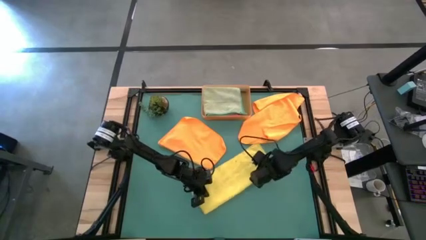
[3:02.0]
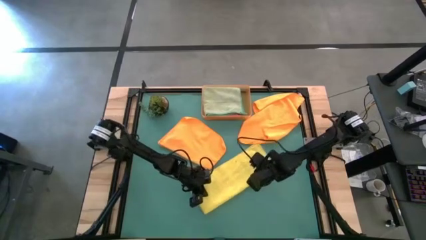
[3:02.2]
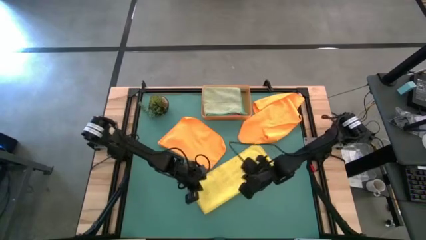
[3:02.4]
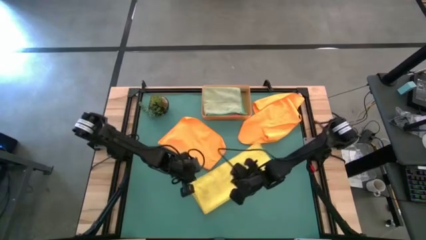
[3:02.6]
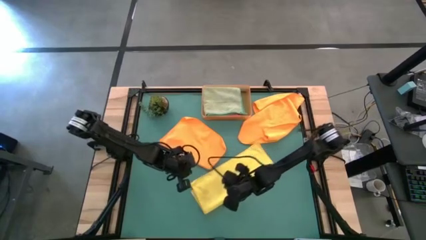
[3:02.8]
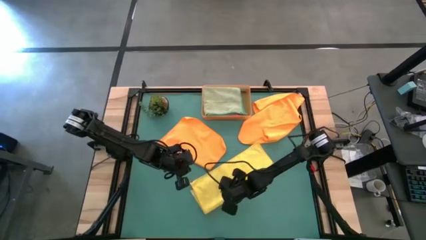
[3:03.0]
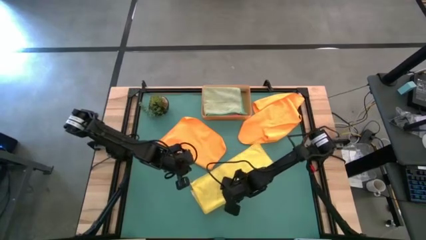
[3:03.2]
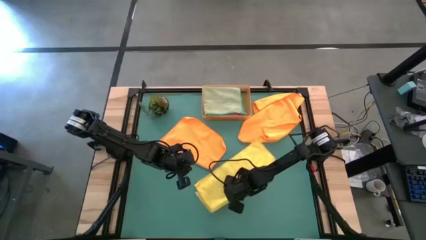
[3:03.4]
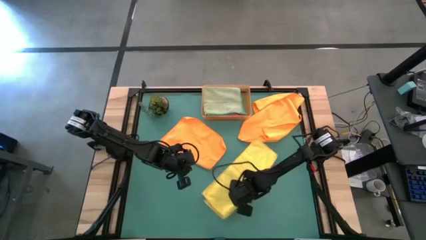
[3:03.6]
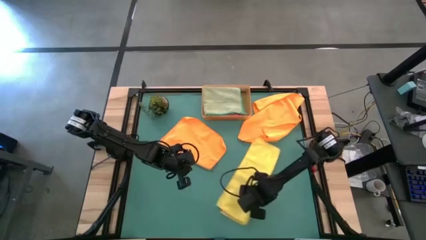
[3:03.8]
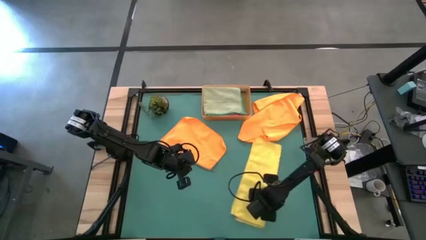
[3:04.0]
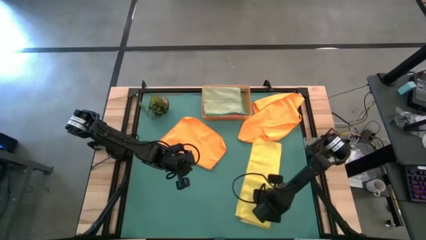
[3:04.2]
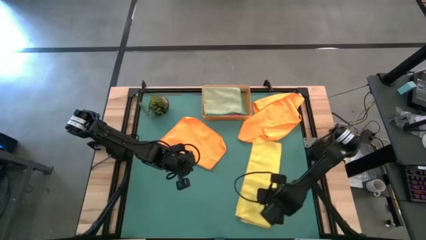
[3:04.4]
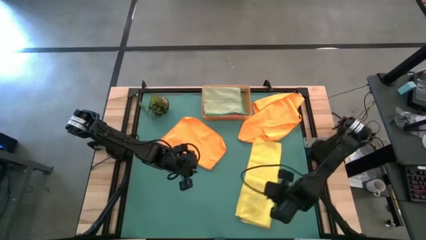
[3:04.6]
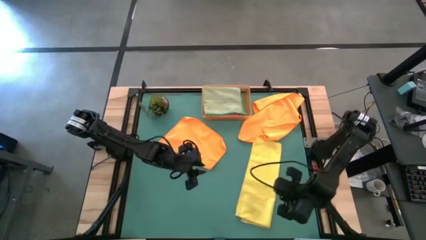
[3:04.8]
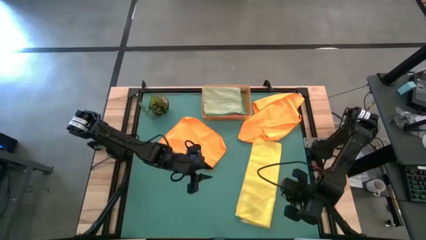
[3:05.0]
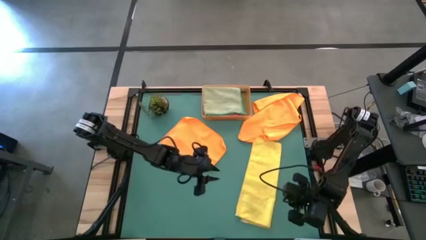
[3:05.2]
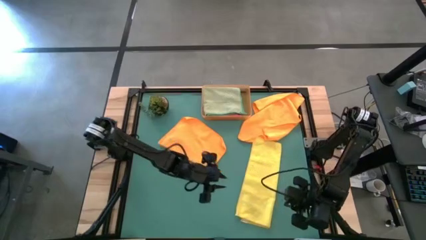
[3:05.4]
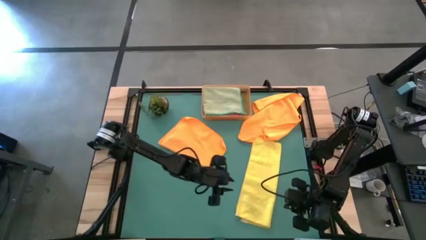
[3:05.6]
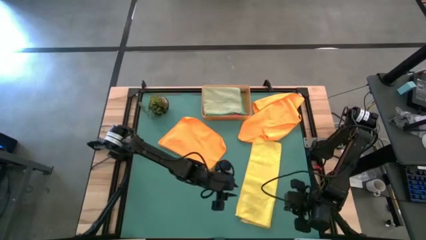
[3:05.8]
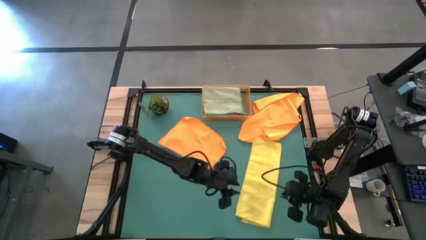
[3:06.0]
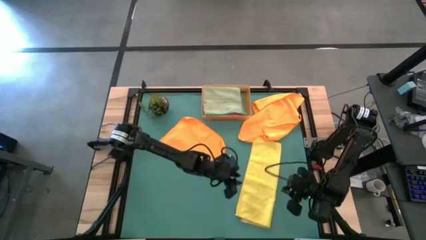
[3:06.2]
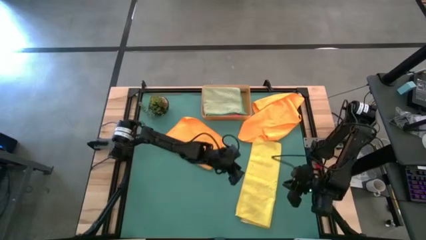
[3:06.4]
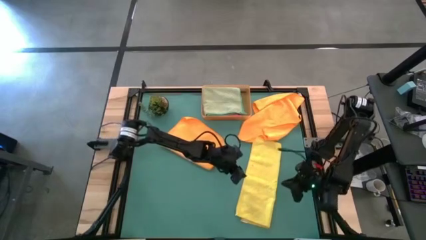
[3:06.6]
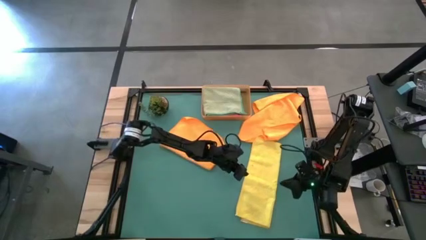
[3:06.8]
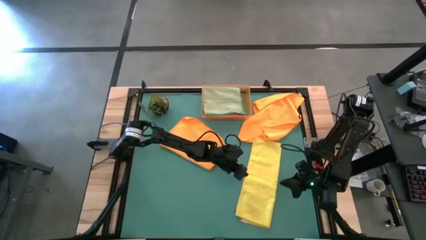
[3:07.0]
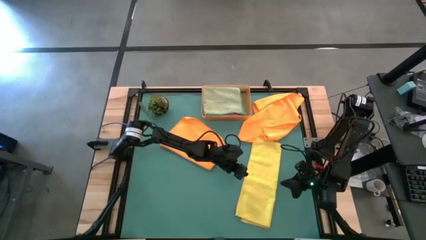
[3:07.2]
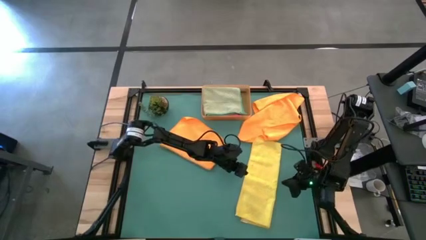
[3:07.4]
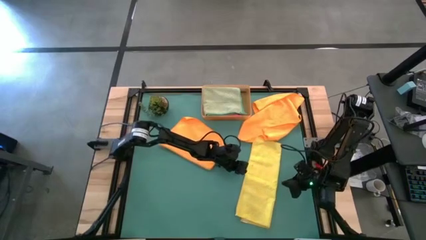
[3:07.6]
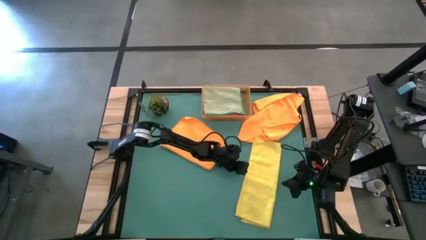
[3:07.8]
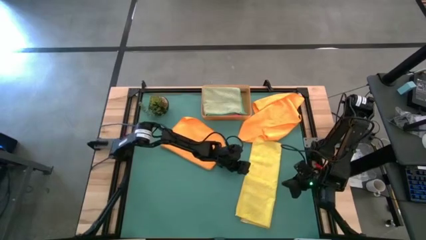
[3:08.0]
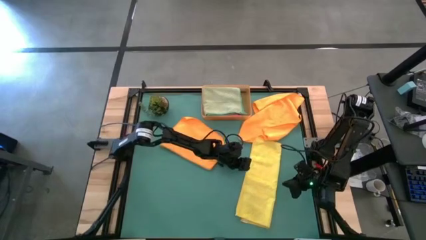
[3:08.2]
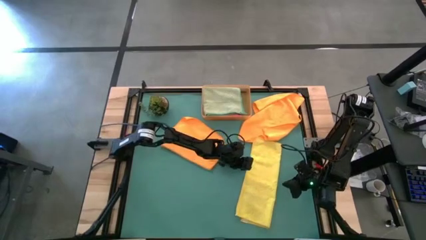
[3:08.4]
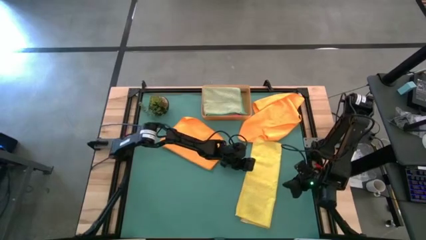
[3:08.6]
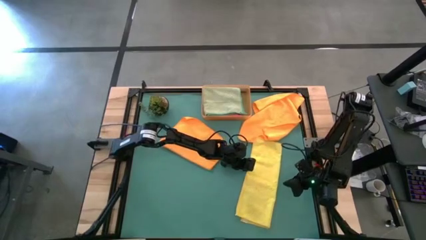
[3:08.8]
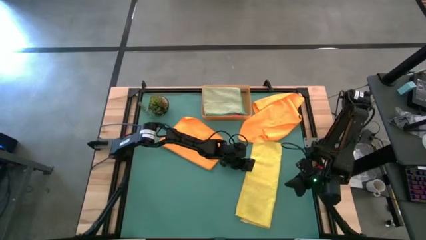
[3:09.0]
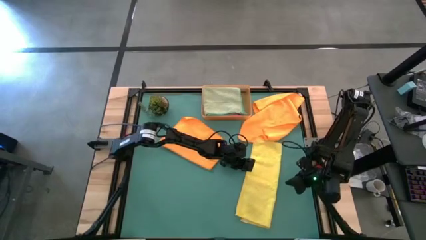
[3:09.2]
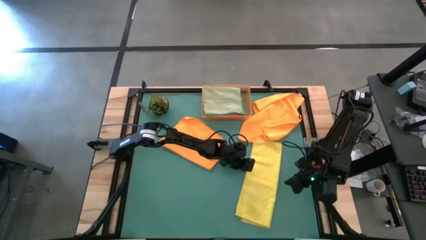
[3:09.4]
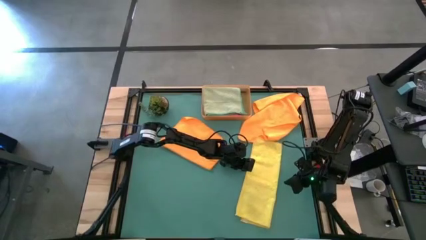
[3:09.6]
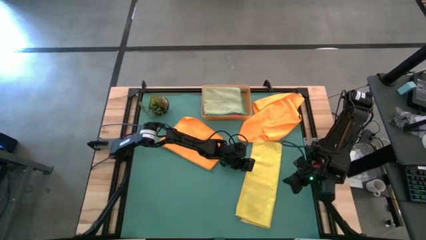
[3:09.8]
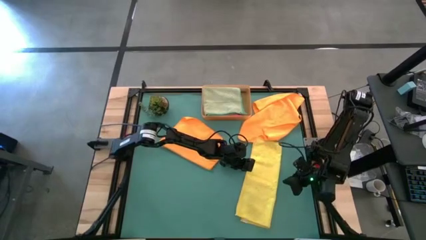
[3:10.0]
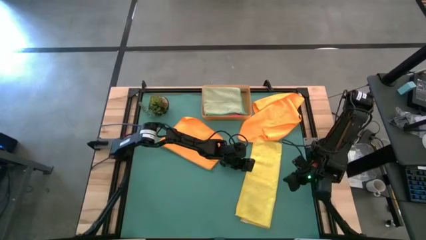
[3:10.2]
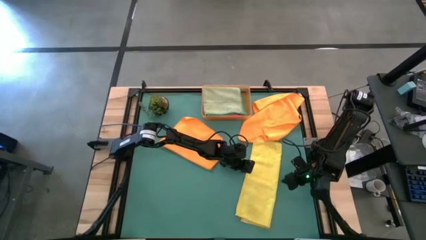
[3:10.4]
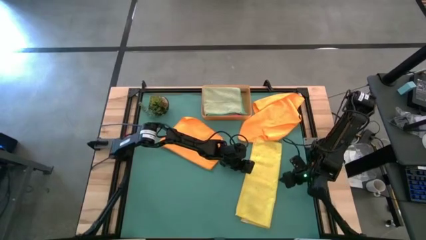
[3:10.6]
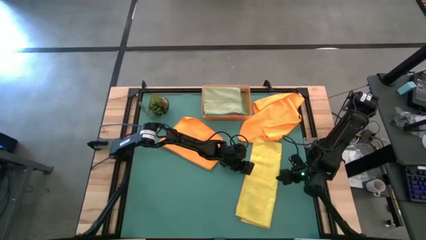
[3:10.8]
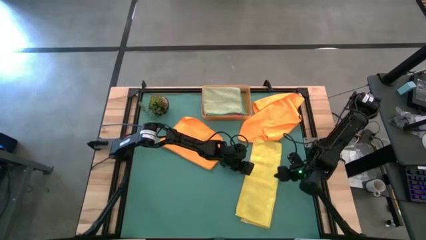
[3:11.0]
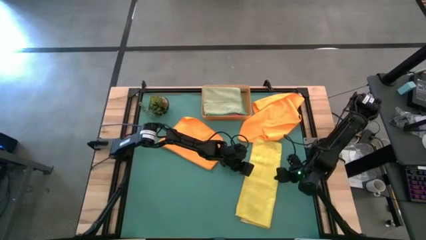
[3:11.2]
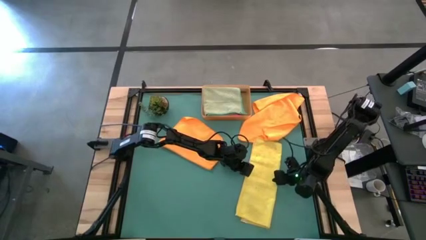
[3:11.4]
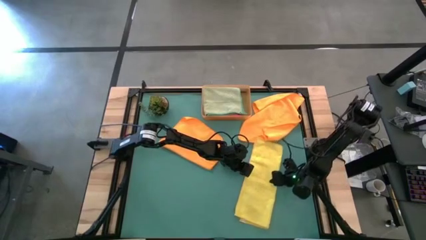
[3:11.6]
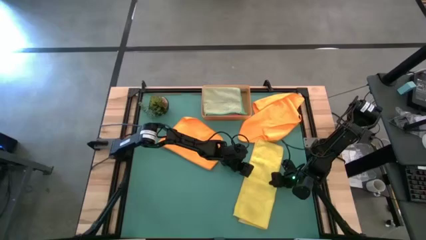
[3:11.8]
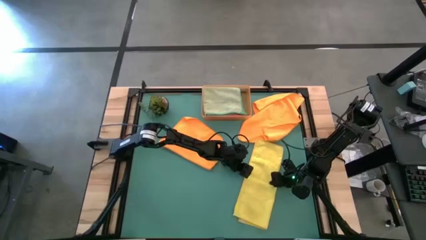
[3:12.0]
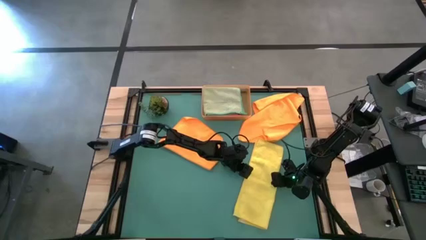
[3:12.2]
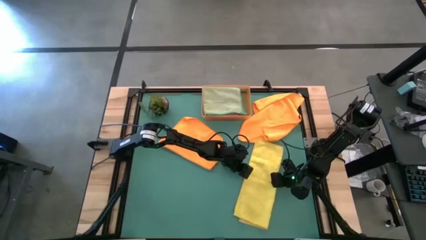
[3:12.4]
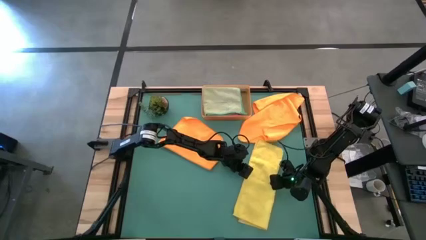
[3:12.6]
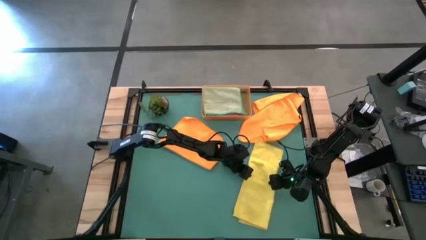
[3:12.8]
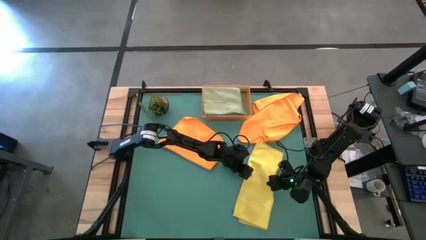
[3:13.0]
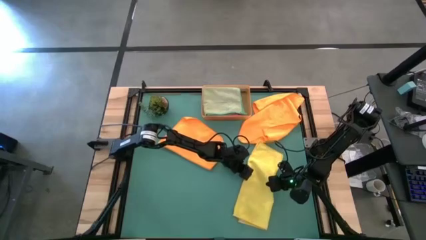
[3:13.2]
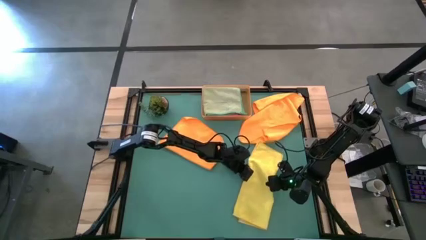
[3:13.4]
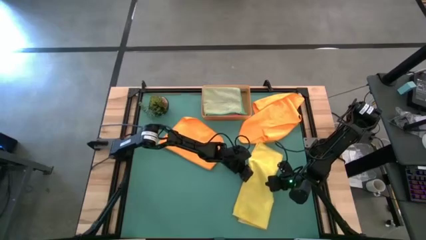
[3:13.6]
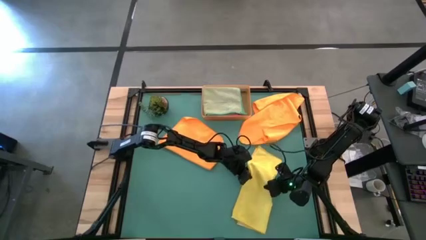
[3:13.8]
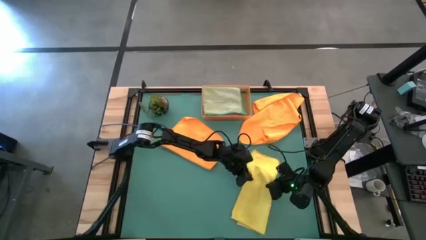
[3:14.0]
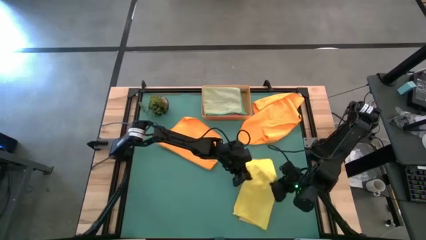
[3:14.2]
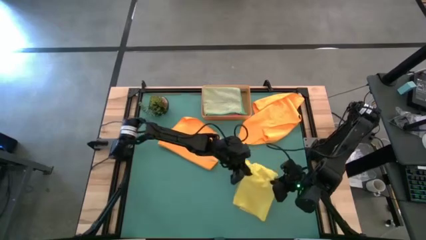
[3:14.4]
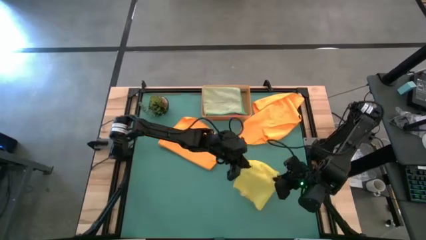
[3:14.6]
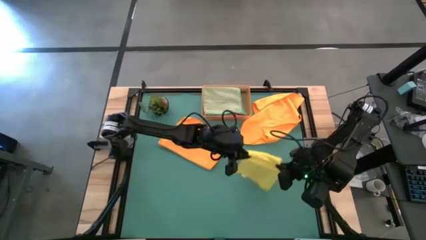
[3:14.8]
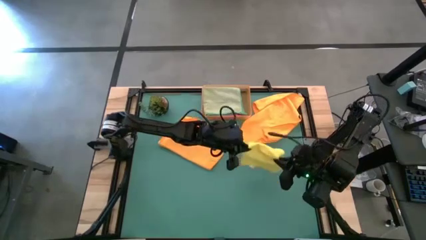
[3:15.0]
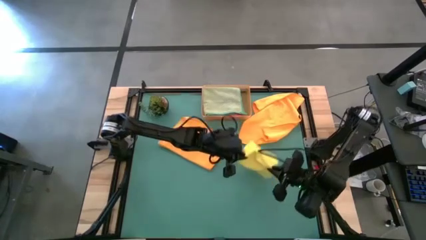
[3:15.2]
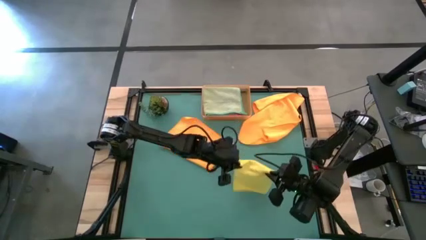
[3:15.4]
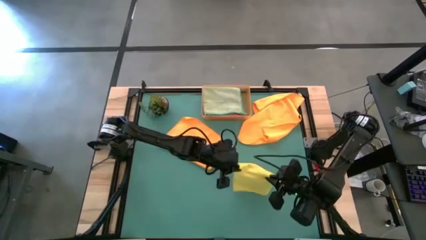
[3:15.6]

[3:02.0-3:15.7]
Task: Fold microfiber towels
Fold the yellow microfiber towel

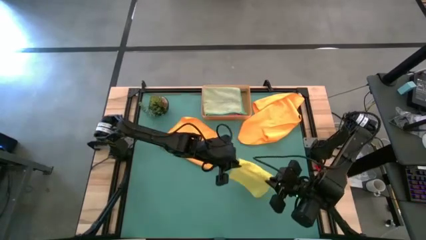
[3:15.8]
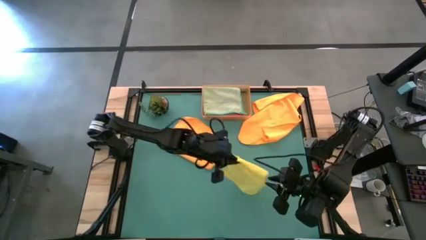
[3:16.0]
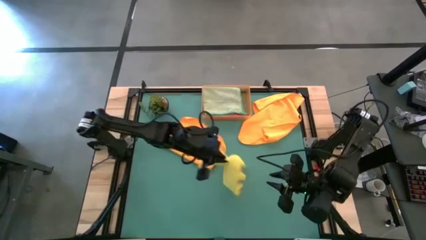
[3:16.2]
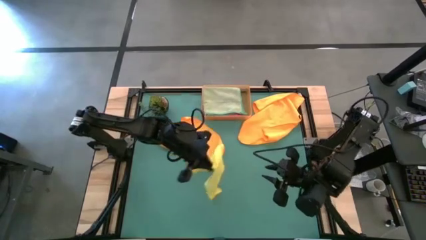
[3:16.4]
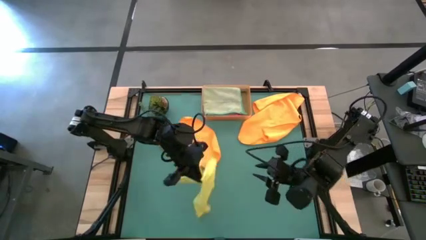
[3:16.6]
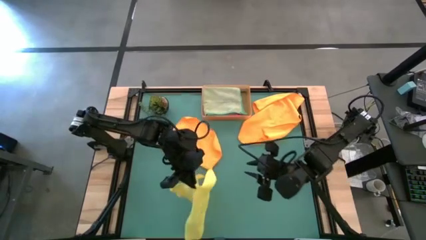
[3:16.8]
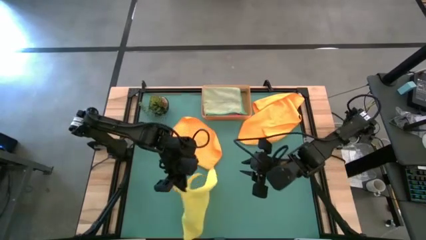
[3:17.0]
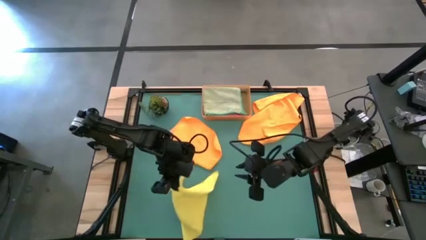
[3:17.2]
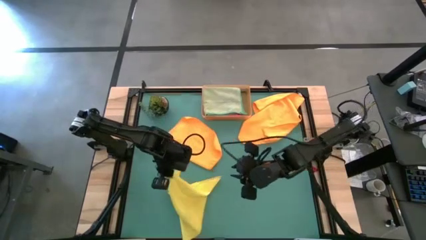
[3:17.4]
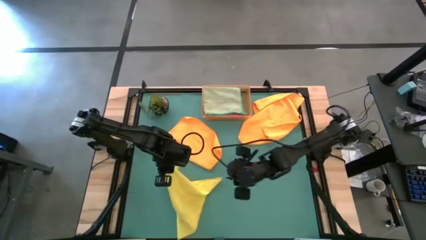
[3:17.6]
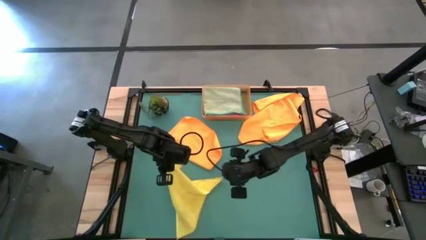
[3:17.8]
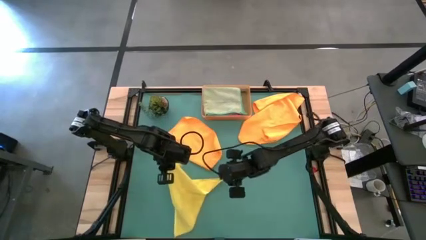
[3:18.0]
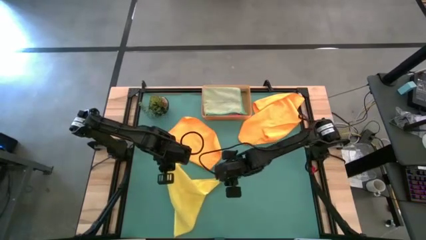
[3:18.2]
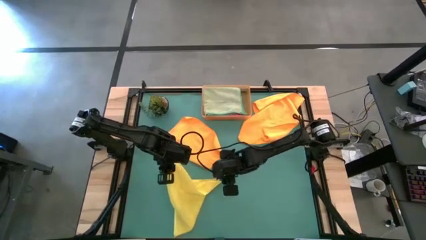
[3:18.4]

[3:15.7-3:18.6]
Fold the yellow microfiber towel
